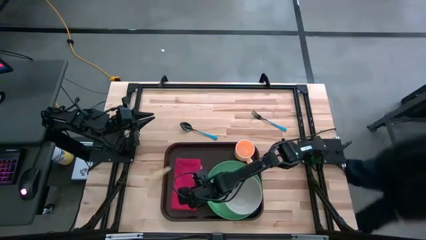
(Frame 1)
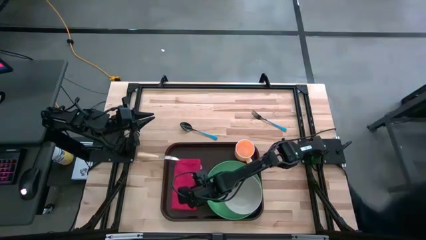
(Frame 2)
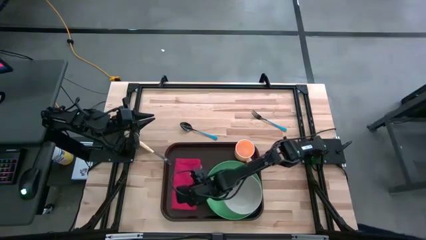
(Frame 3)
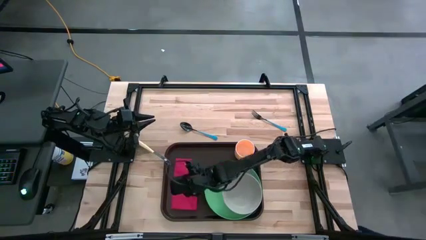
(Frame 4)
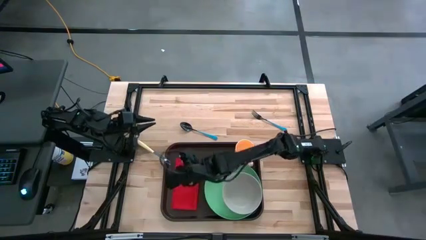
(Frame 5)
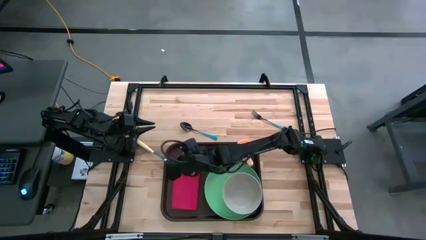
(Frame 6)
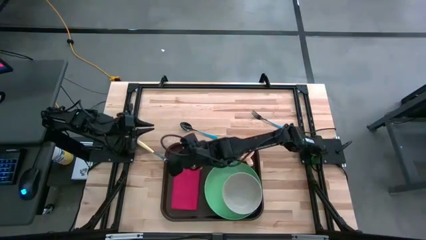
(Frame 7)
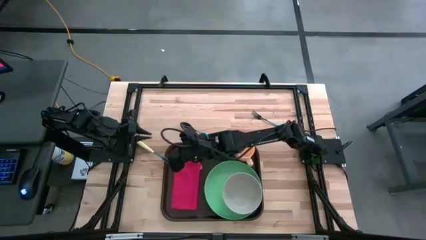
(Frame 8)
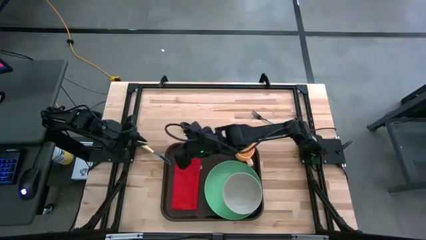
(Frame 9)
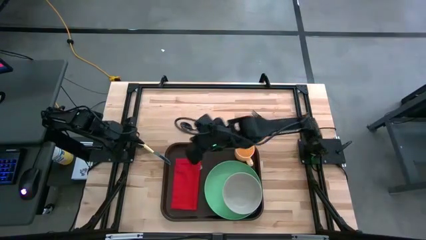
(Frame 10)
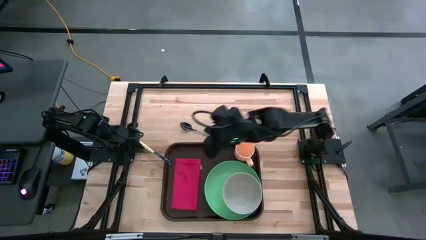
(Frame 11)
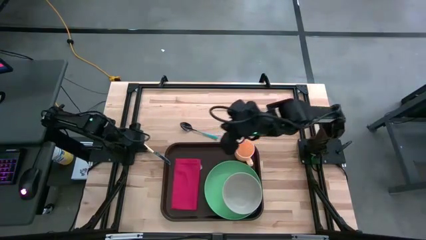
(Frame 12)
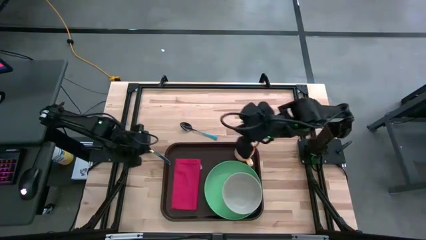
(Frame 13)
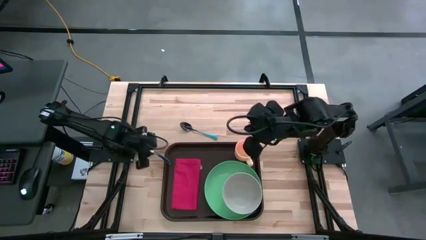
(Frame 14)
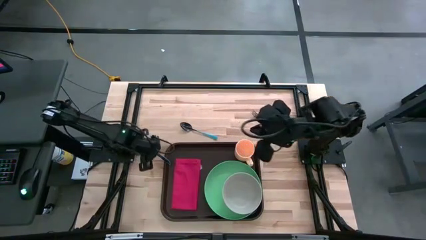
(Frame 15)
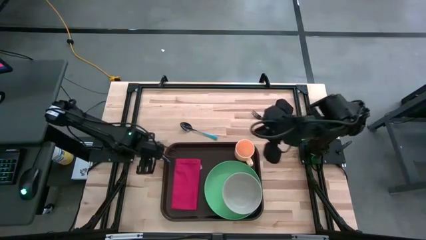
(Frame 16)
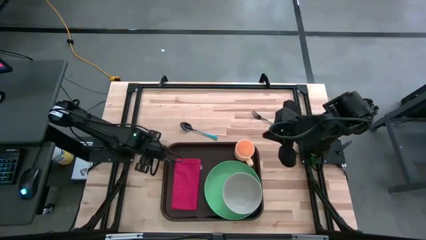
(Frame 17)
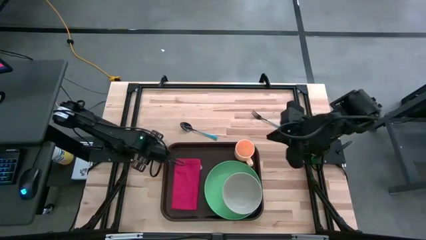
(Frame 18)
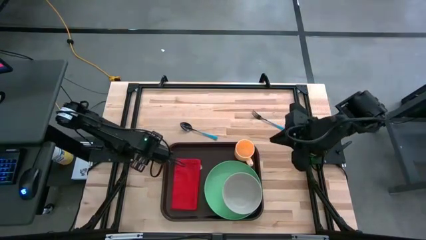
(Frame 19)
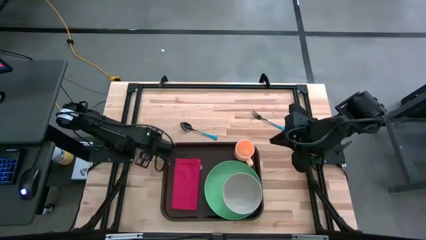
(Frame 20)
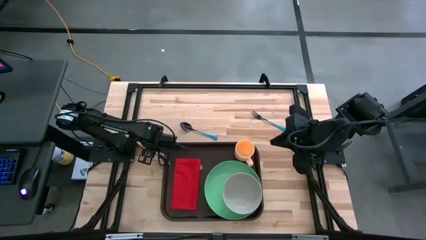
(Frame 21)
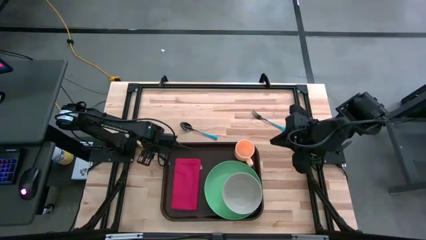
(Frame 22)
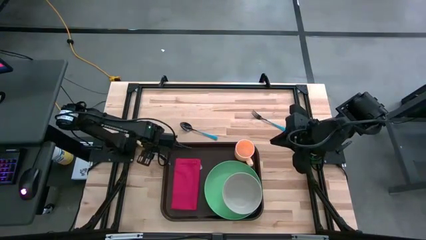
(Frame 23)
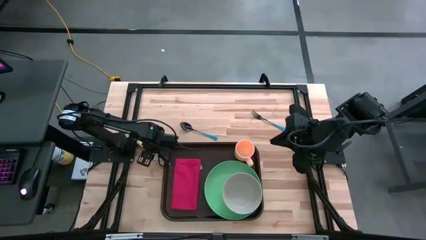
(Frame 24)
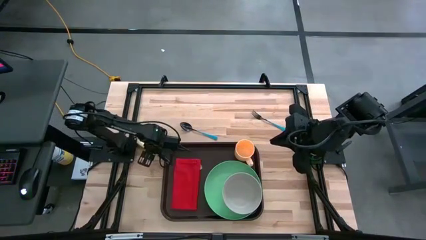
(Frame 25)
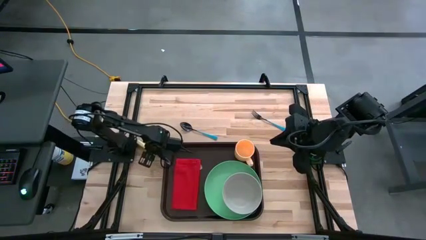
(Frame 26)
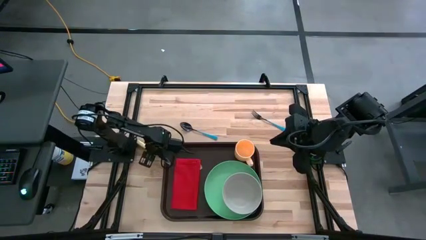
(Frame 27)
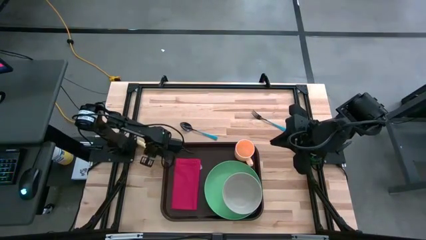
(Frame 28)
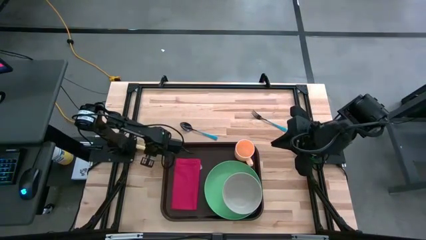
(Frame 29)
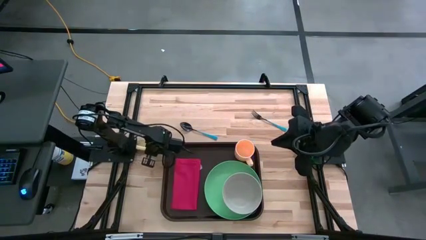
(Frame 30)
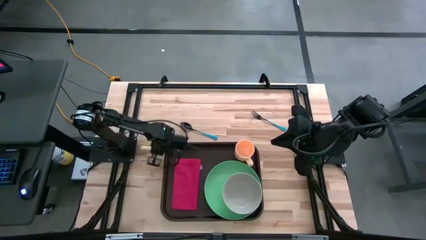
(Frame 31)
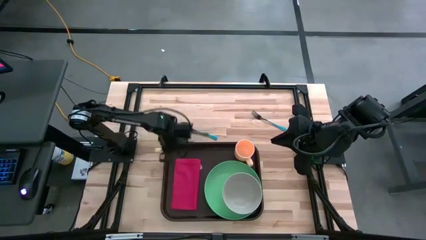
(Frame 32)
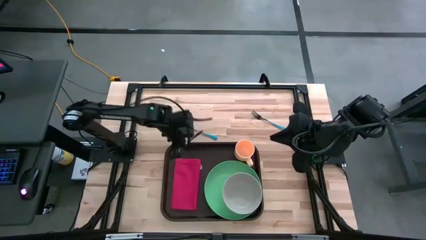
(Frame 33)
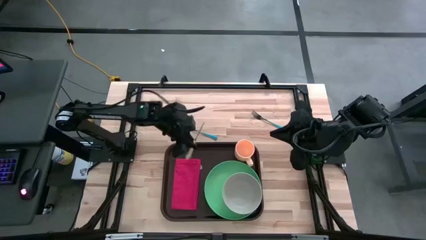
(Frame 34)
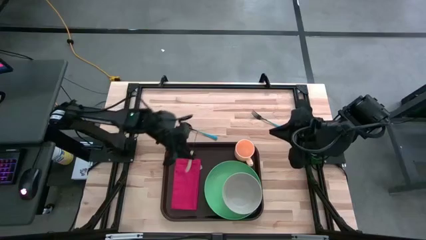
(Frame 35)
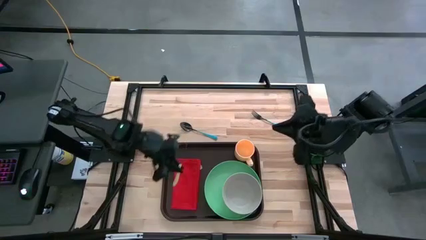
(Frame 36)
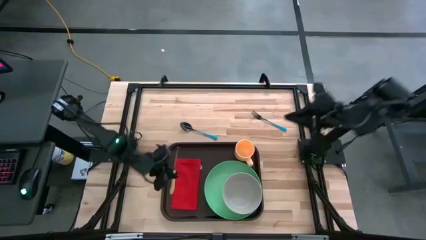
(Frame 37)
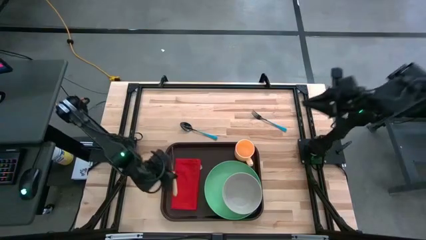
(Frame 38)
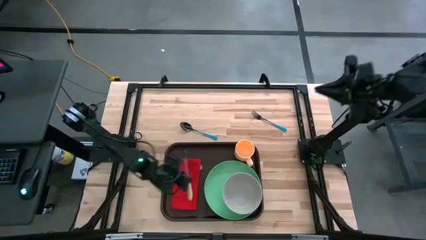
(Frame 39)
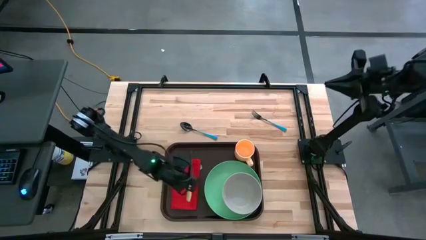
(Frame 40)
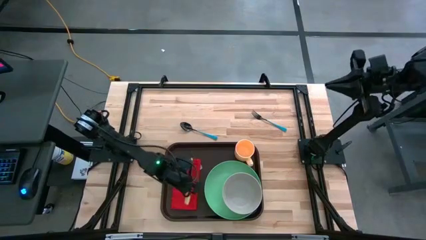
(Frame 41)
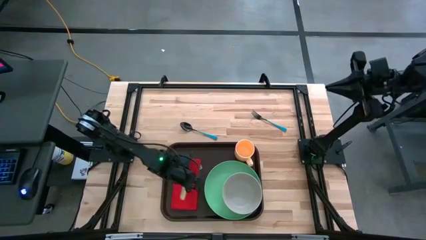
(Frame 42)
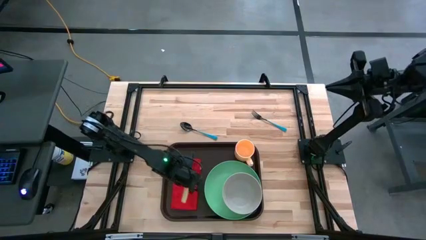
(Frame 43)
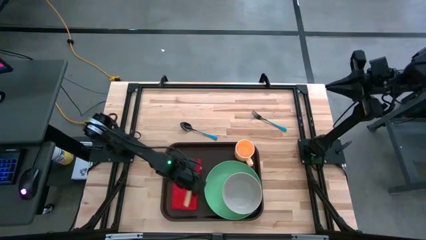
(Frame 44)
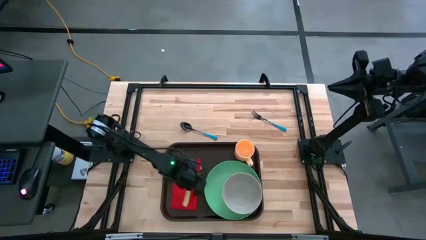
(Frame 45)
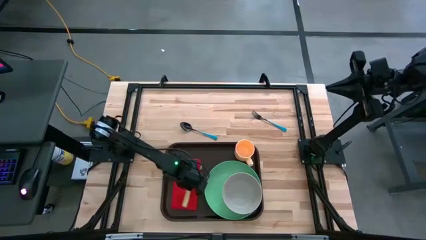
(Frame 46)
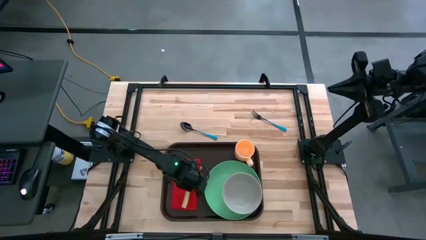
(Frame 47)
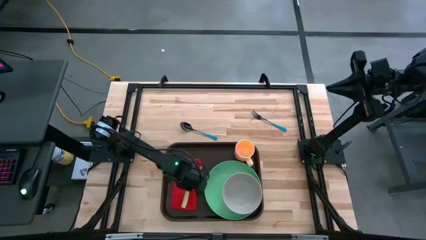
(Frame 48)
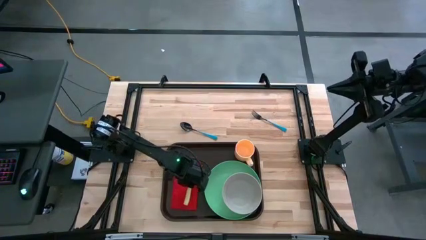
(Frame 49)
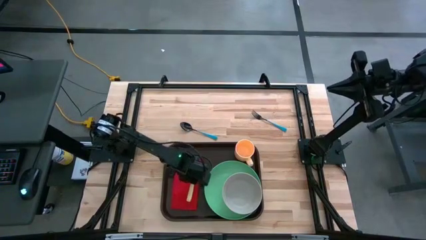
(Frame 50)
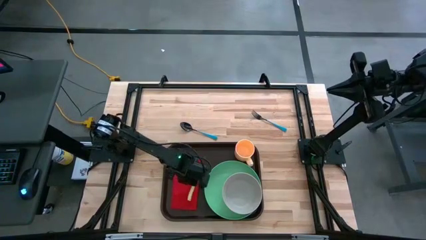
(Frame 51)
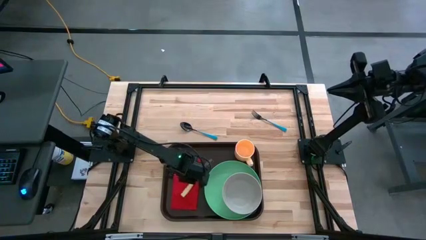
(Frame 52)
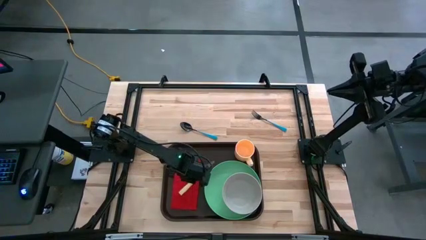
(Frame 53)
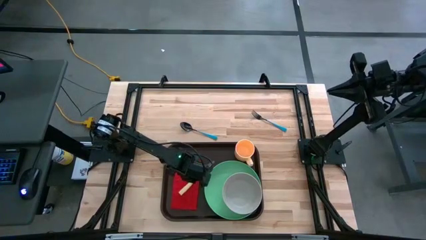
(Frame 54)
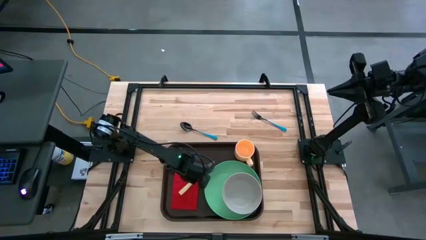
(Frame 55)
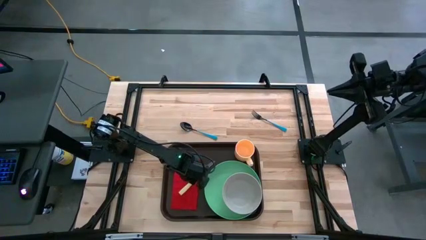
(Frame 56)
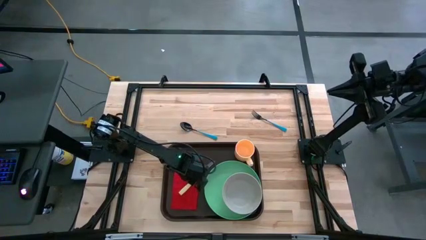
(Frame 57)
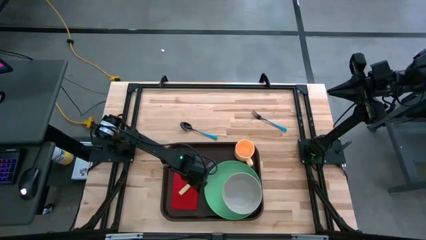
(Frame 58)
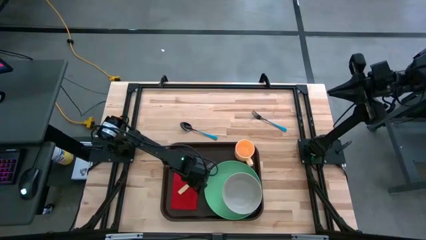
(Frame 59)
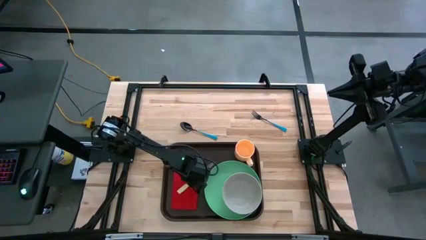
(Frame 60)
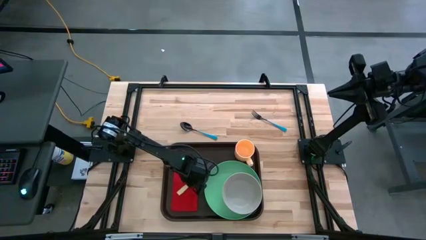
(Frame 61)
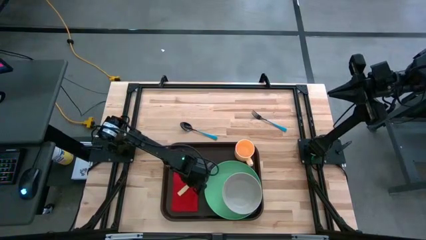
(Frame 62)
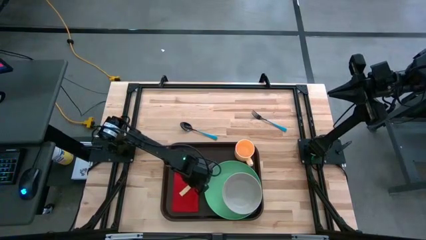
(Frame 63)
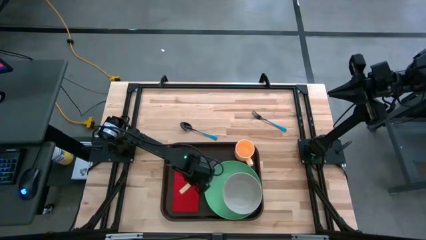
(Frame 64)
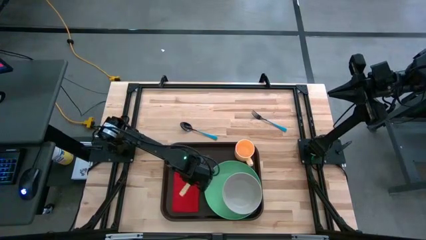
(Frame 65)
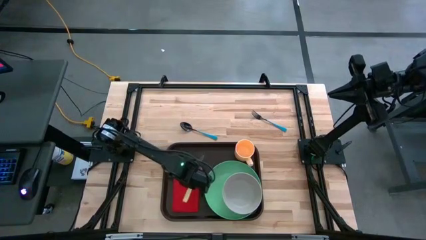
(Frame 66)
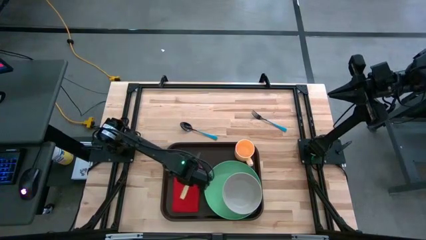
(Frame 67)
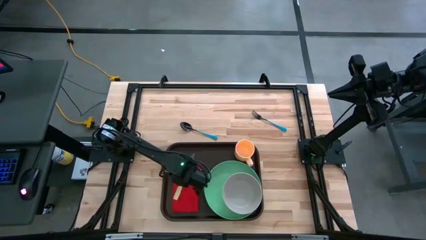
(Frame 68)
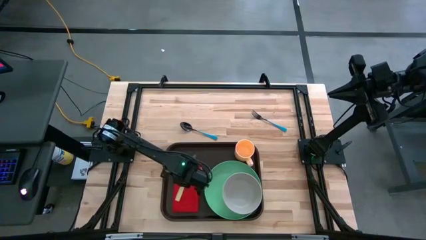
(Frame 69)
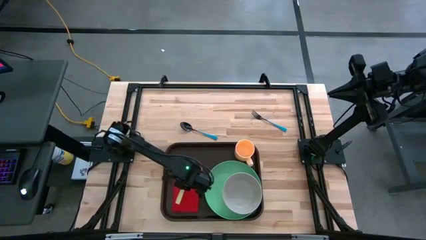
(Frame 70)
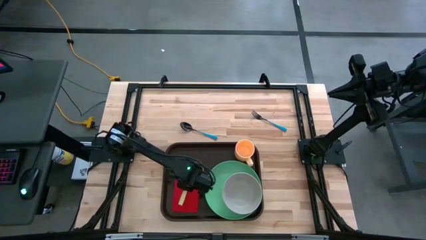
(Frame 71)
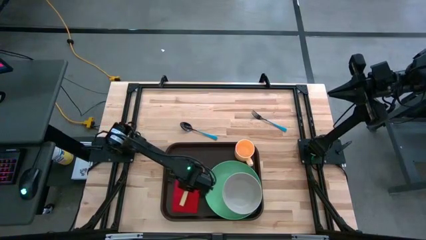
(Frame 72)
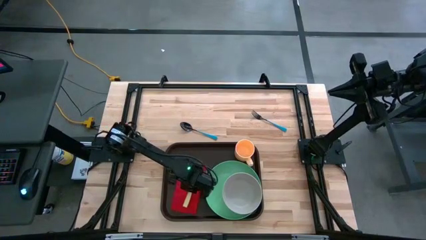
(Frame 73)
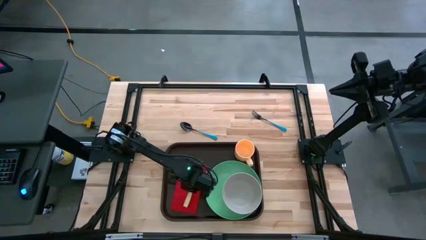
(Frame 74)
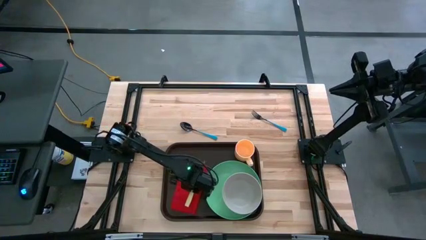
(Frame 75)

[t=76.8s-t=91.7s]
Task: Set up tray
Put the yellow knife to the left of the green plate on the red napkin on the brown serving tray

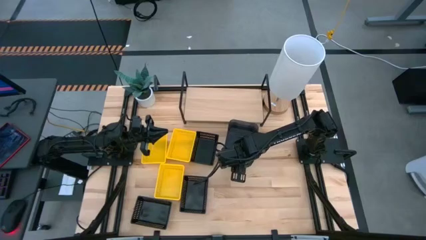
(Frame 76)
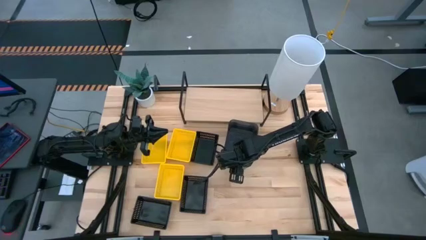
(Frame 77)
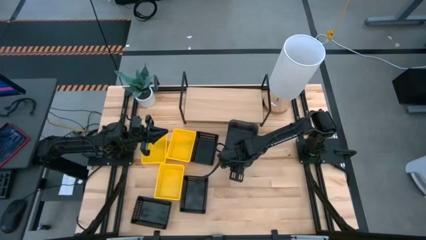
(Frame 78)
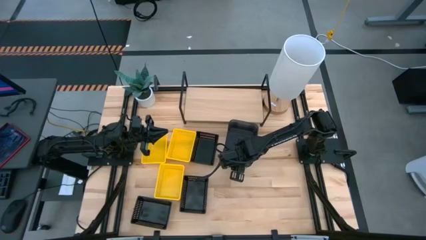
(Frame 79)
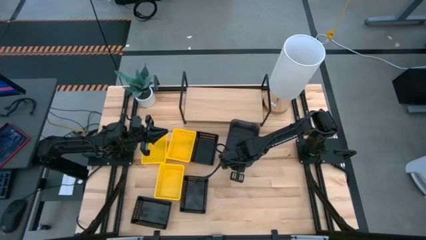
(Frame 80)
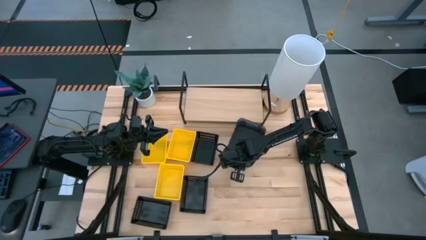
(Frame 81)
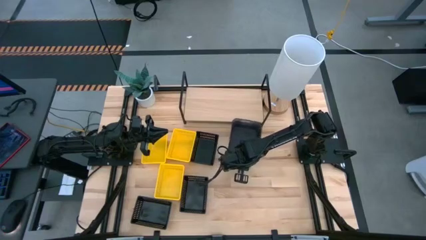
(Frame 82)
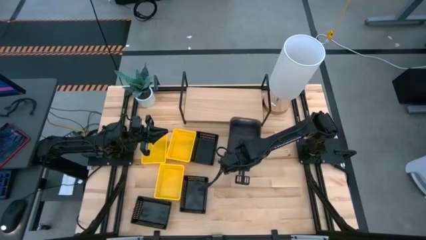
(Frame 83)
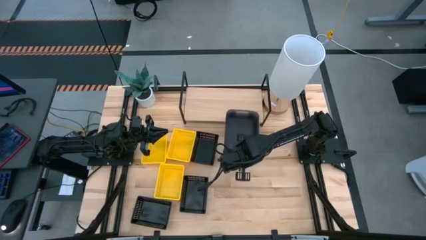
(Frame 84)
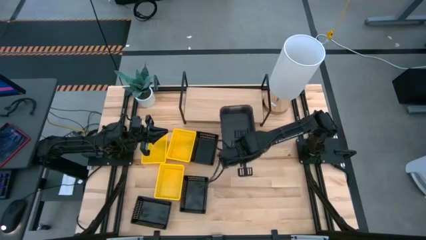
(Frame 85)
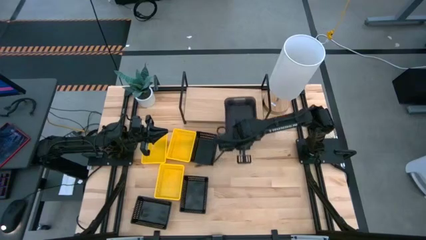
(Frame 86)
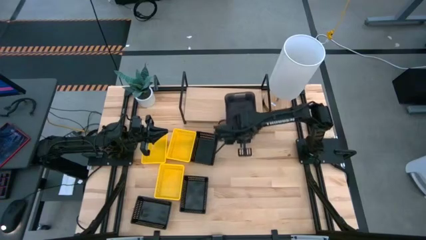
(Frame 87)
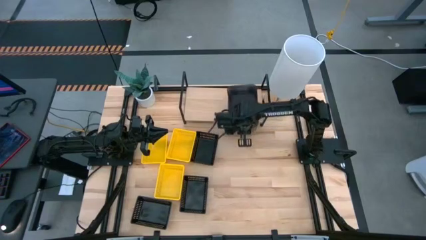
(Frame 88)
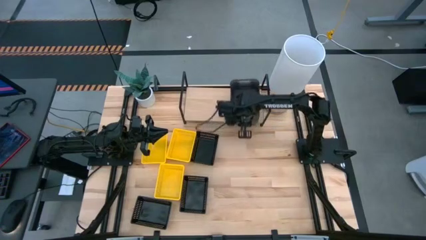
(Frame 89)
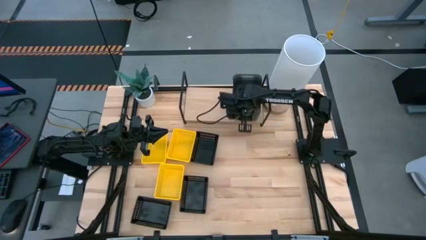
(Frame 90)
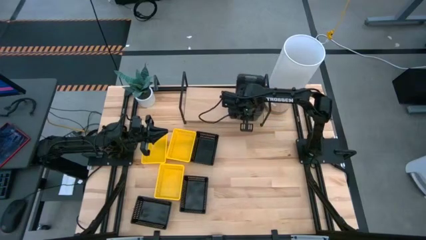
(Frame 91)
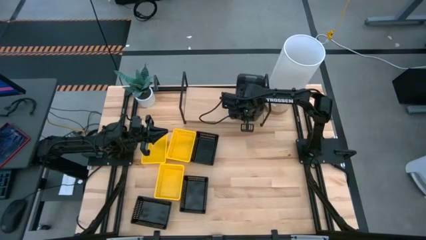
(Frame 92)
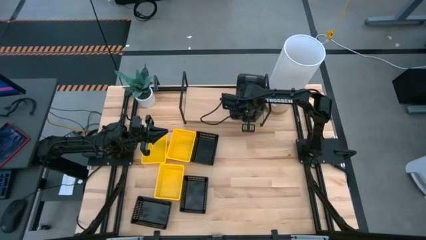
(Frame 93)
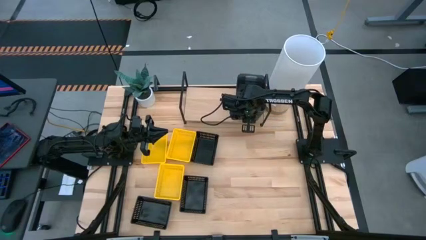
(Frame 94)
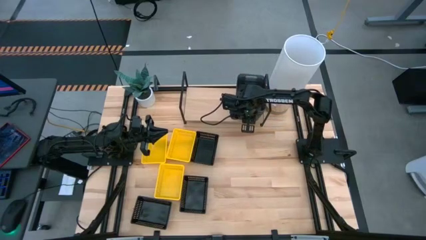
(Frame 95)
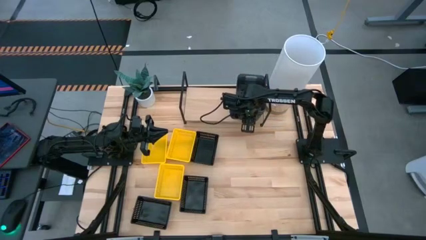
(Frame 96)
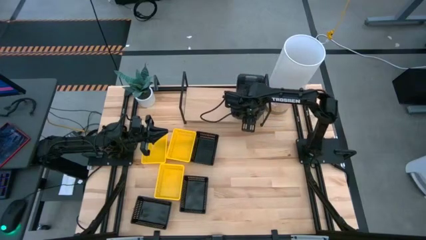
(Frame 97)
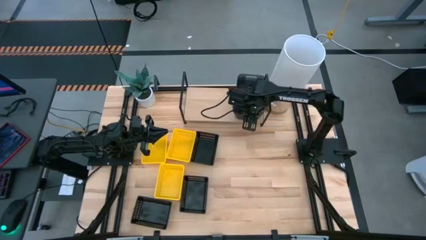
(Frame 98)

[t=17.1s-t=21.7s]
Task: Stack baskets on shelf by color
Put the stacked transparent black bins on the shelf
